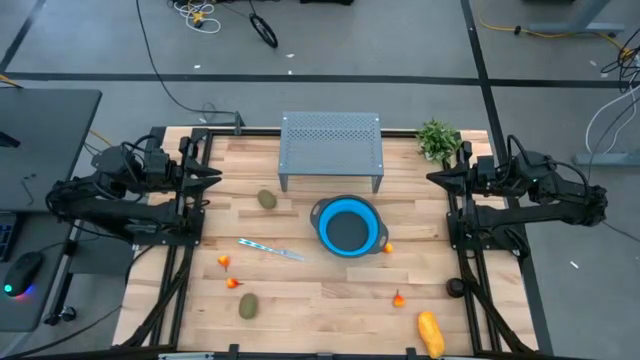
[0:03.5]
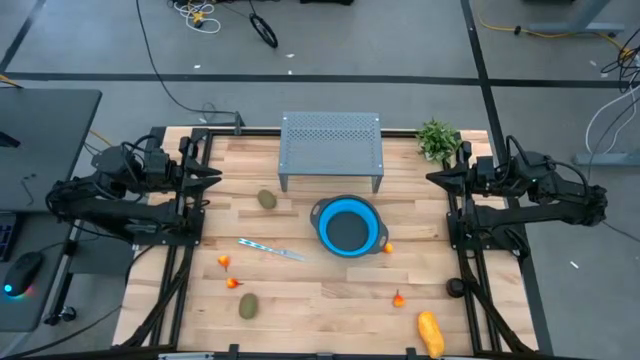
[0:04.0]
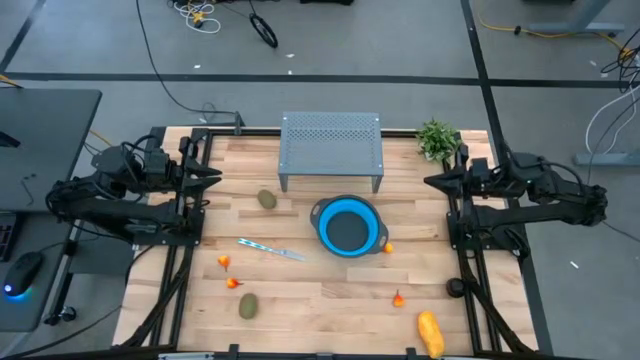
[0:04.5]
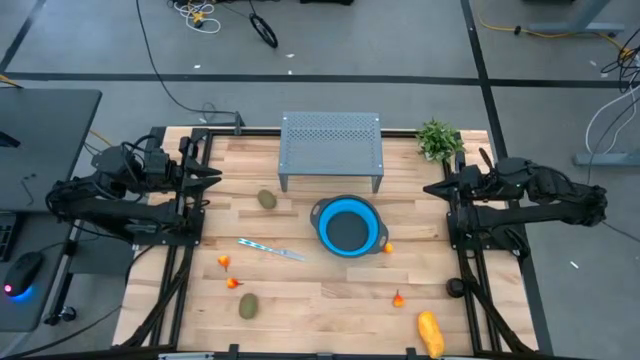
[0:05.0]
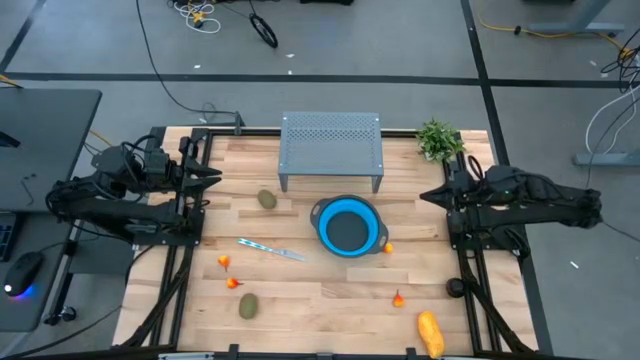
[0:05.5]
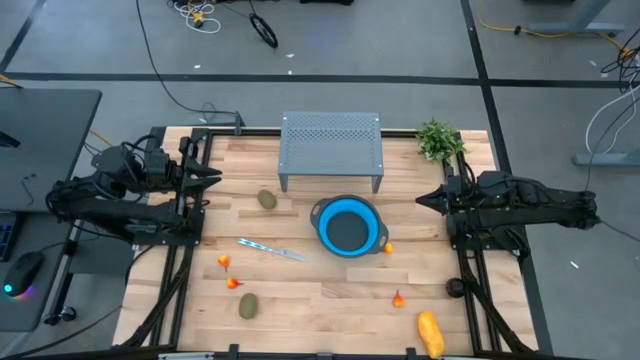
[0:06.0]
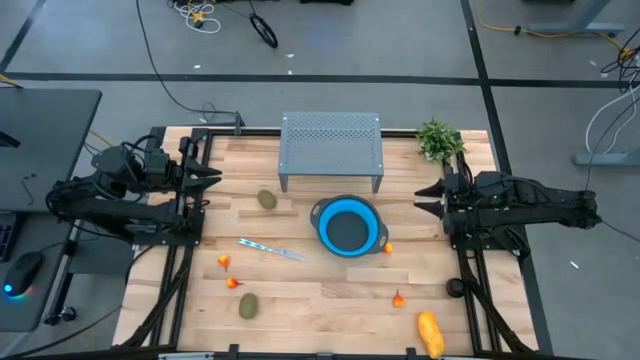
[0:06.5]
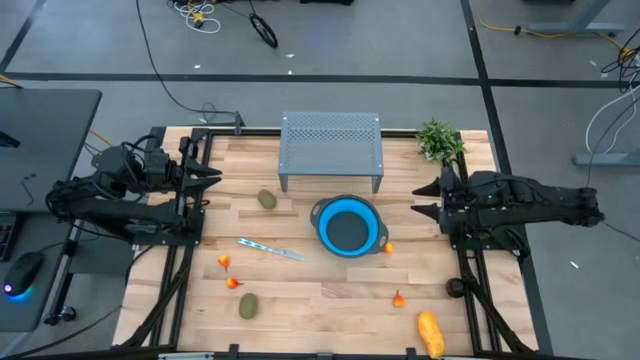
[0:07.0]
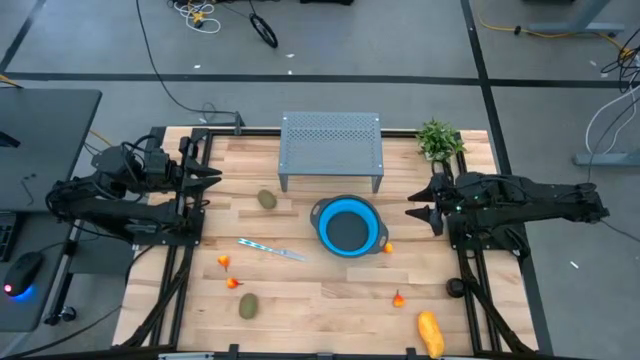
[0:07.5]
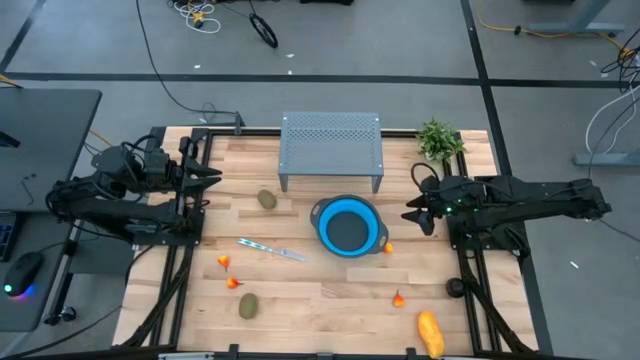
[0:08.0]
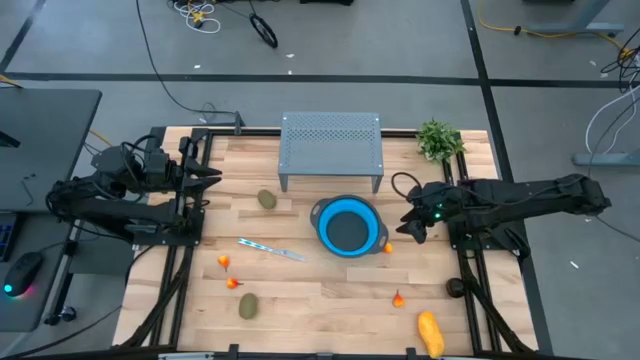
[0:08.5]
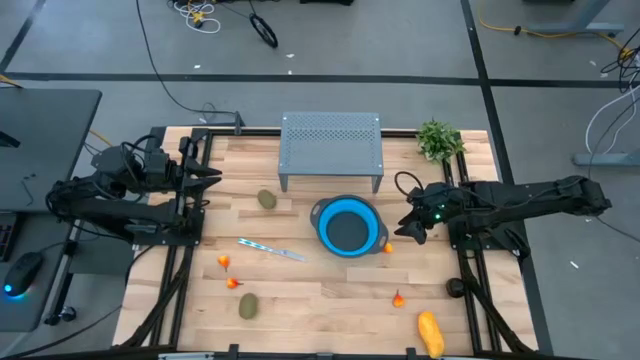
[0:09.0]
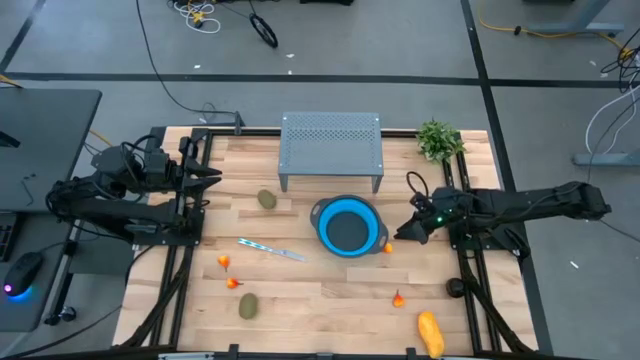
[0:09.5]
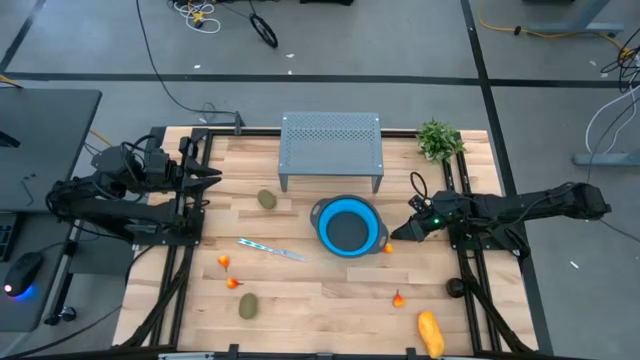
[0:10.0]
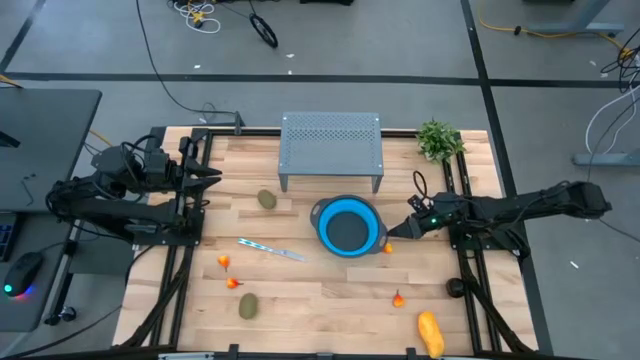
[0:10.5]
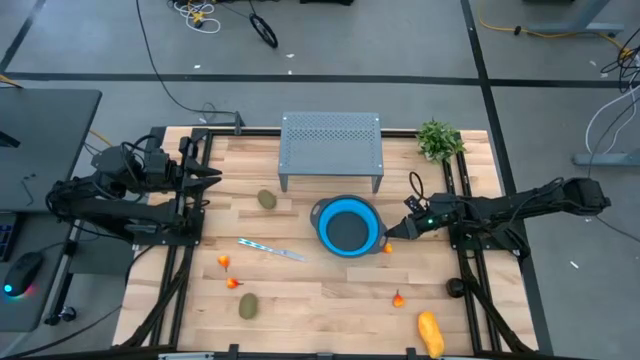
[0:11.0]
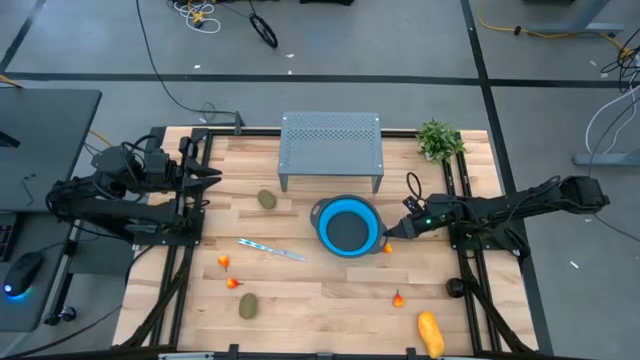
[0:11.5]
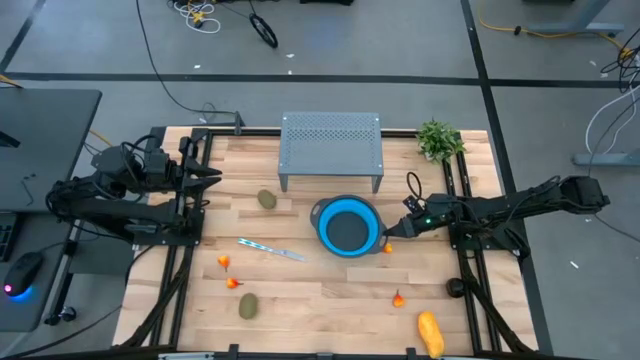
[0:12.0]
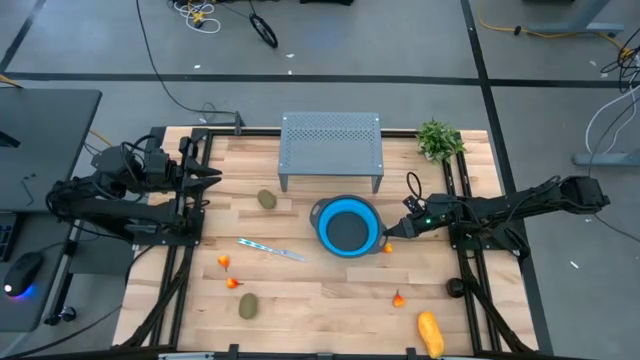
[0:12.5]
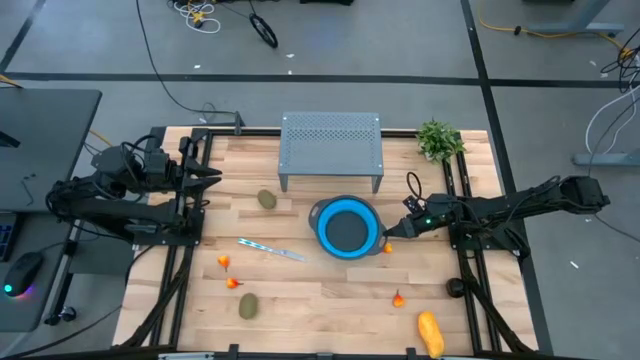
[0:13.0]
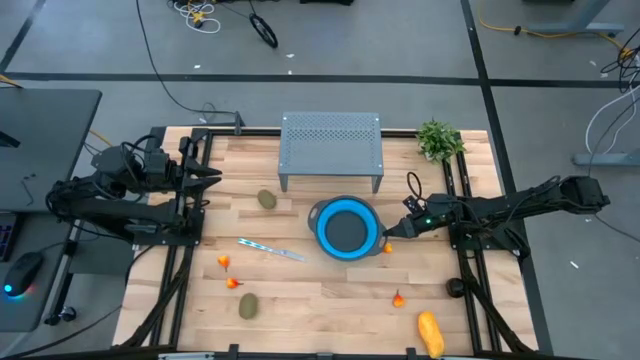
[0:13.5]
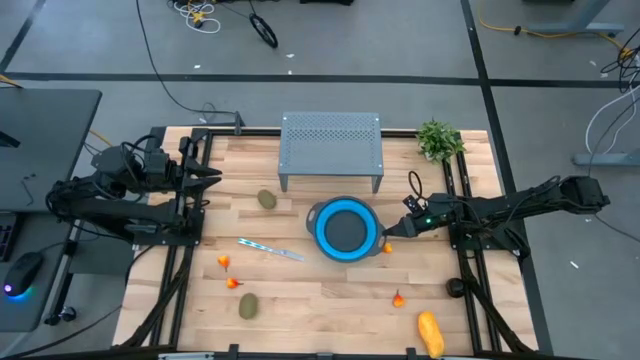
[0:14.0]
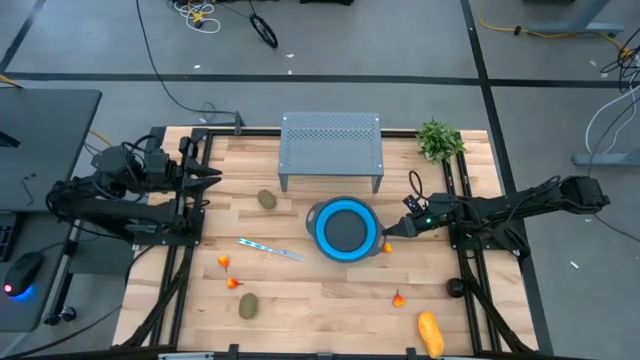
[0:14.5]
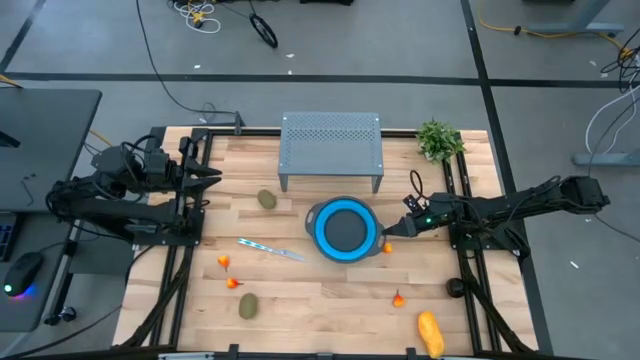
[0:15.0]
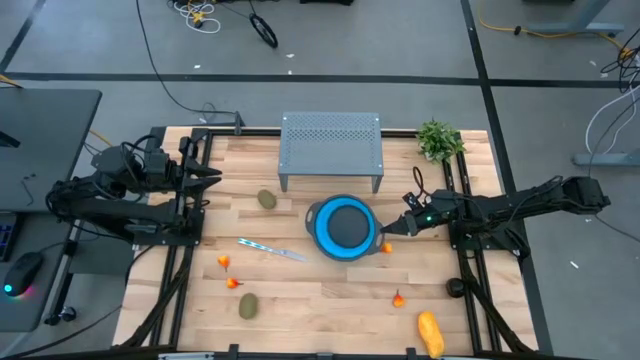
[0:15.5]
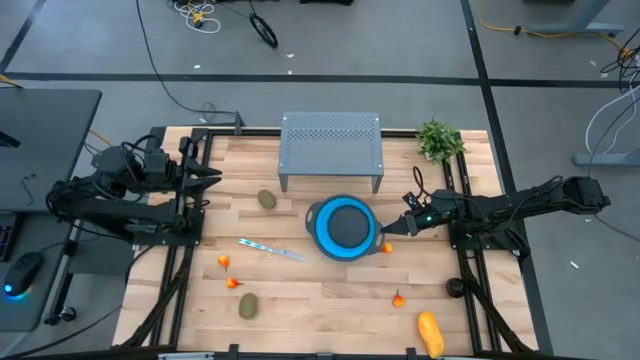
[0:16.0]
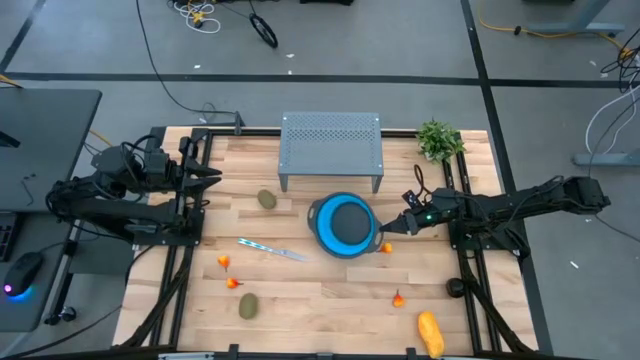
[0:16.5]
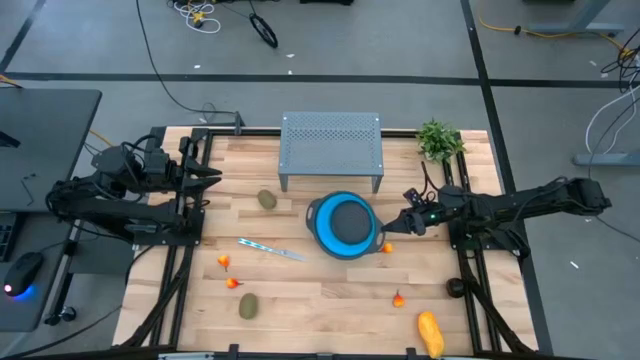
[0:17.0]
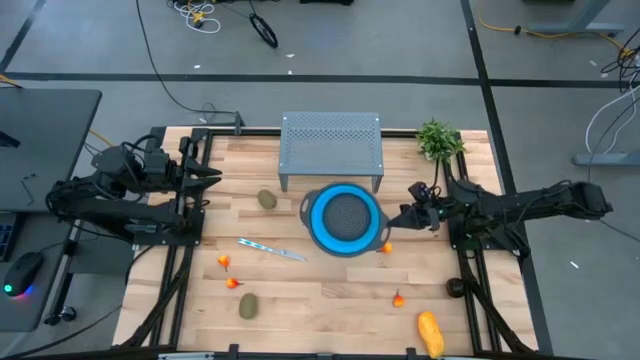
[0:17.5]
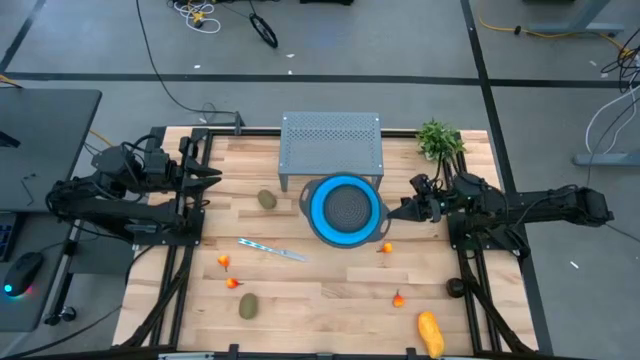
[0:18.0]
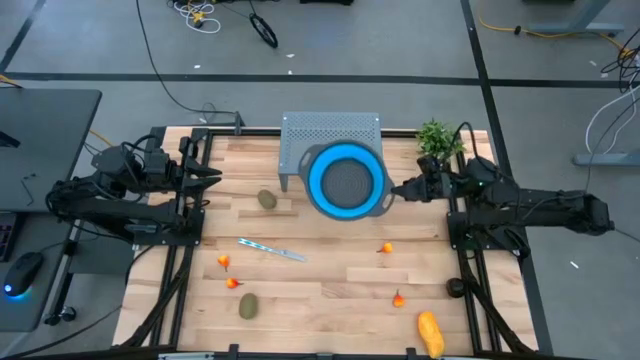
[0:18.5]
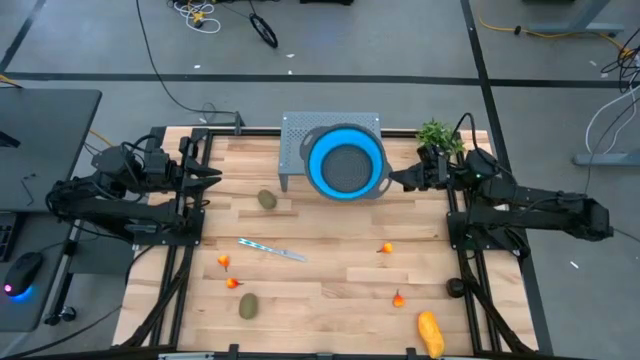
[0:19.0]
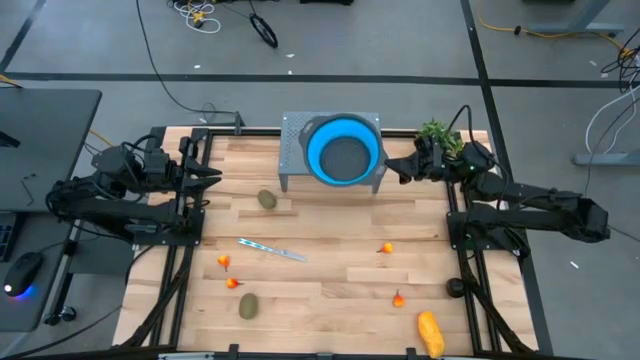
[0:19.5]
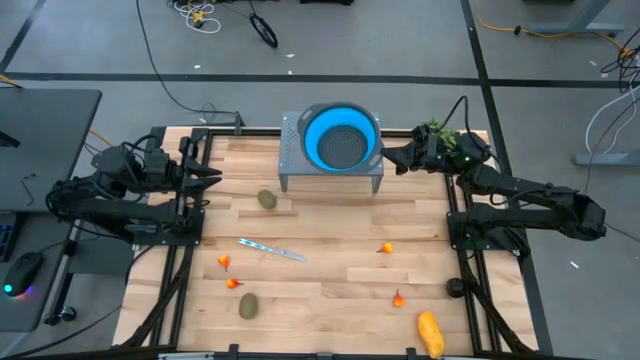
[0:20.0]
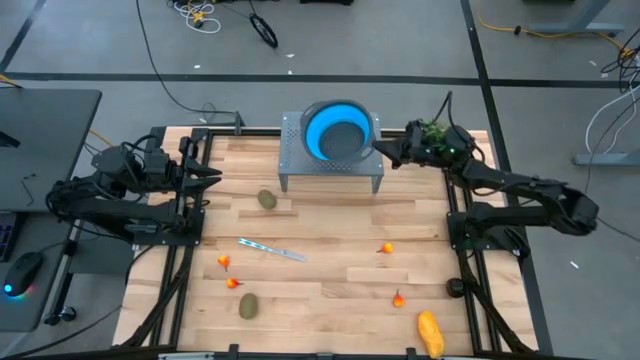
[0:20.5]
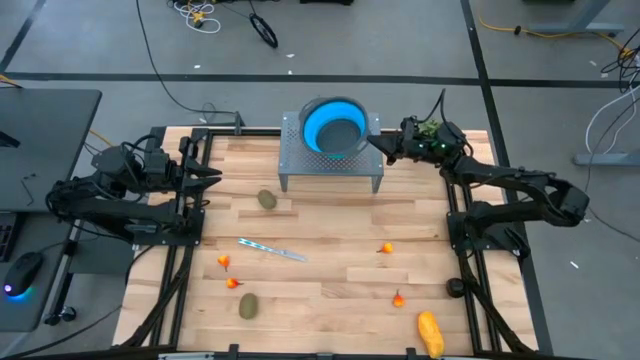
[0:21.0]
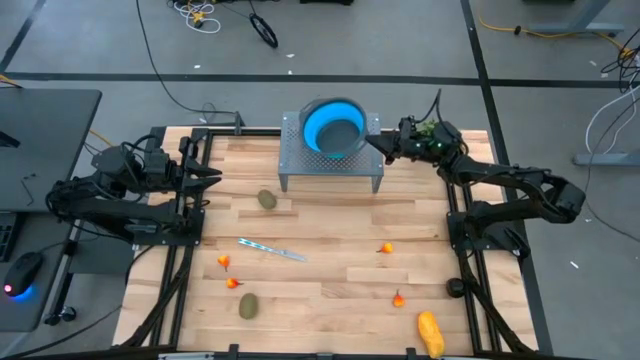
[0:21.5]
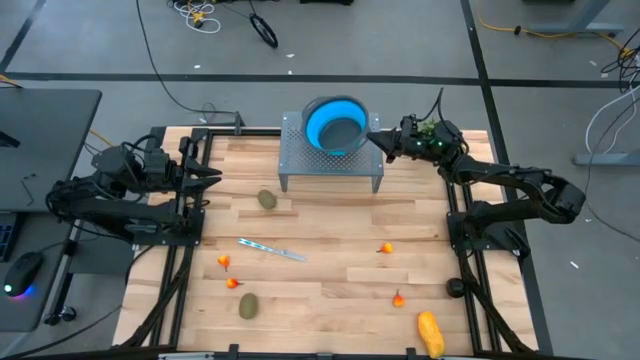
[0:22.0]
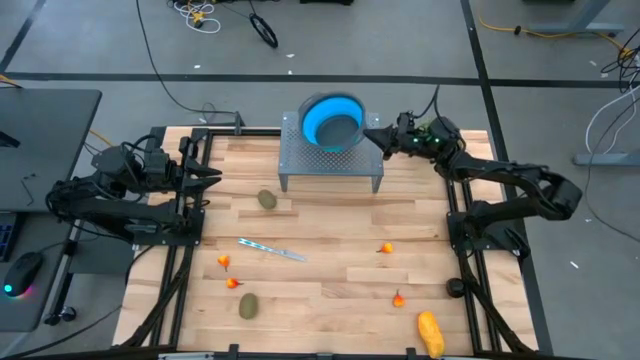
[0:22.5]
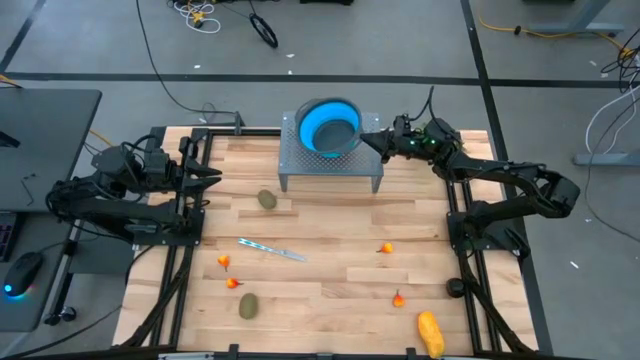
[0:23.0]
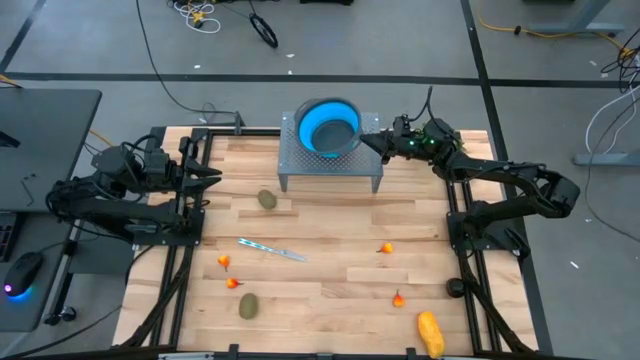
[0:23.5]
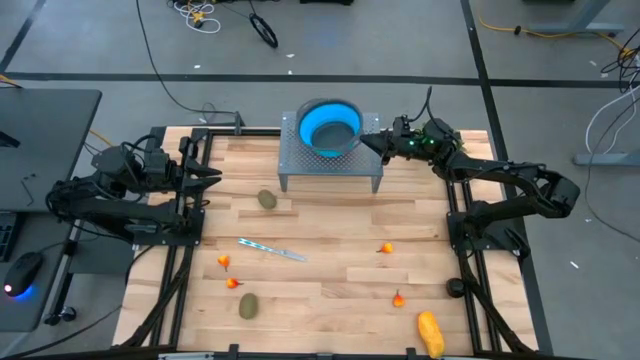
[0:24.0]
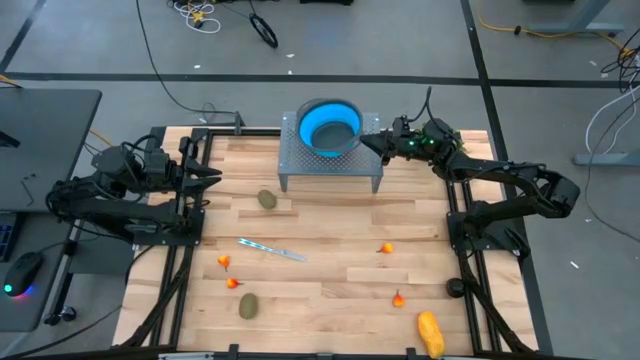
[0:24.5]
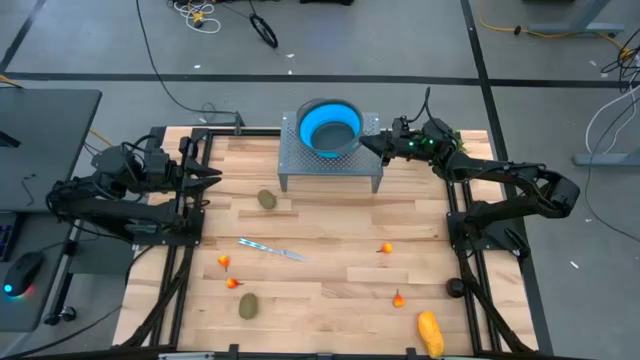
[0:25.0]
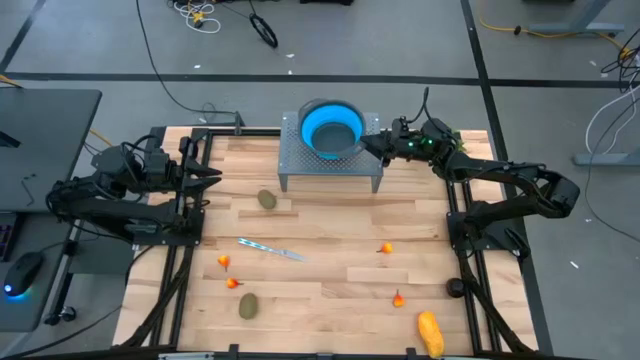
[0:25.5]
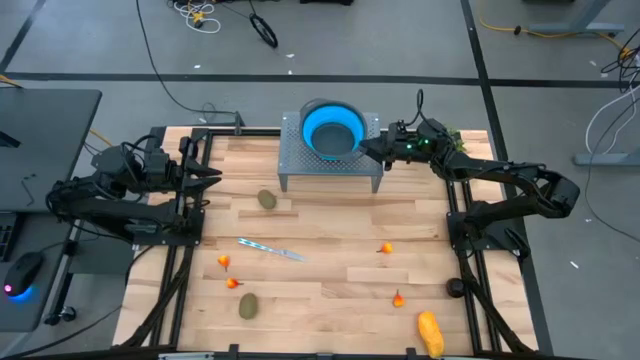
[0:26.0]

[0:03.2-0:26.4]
Task: Pick & Place Fruit
Put the blue bowl on the shelf
